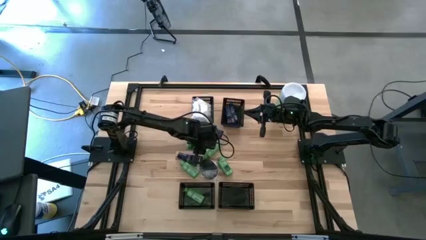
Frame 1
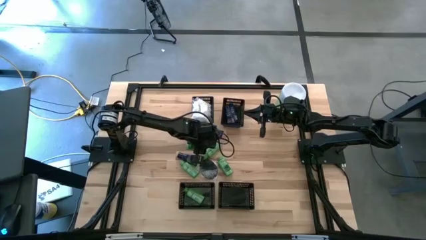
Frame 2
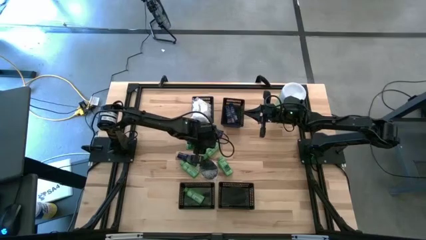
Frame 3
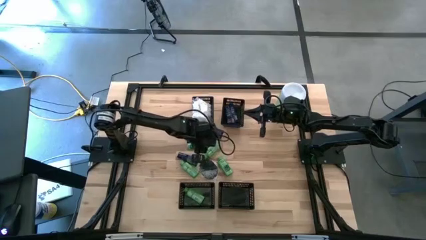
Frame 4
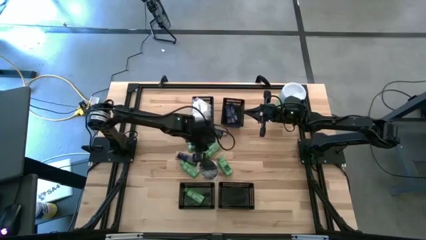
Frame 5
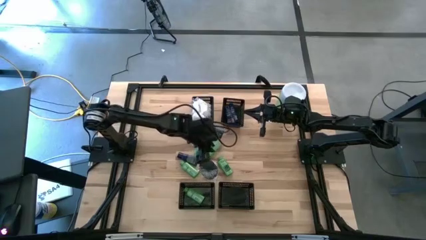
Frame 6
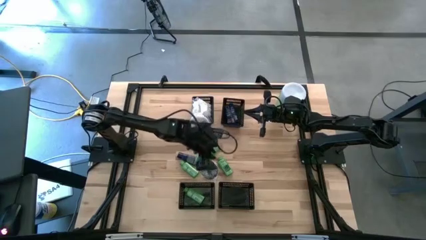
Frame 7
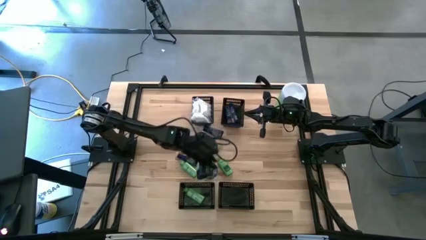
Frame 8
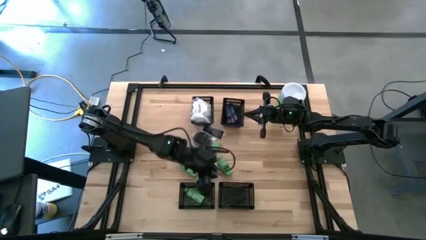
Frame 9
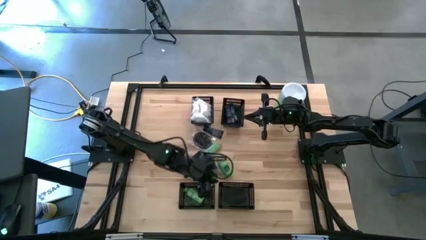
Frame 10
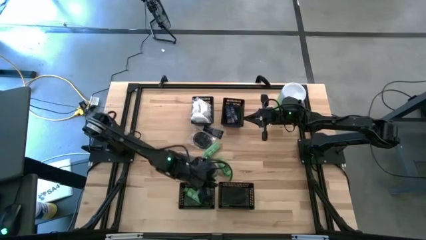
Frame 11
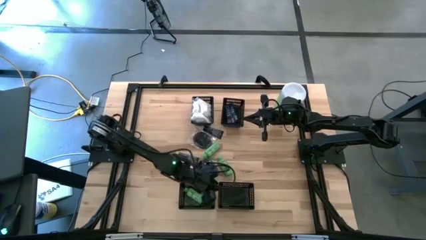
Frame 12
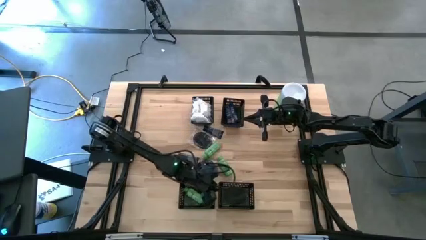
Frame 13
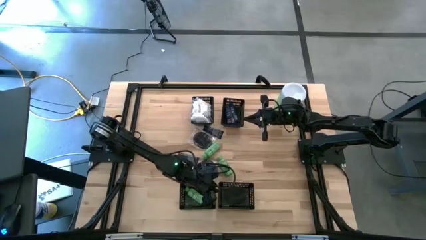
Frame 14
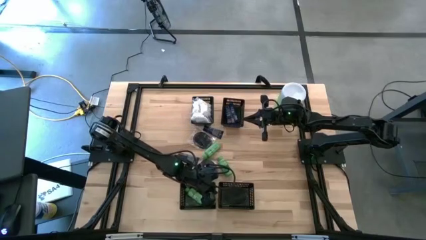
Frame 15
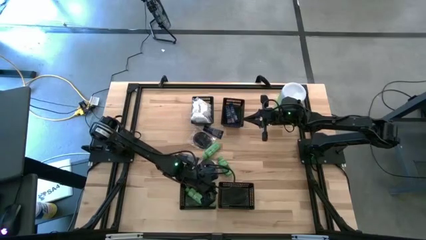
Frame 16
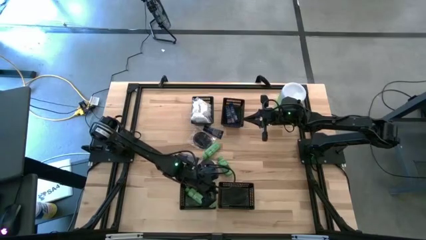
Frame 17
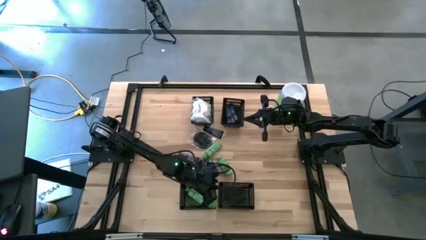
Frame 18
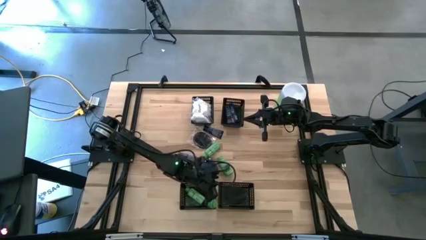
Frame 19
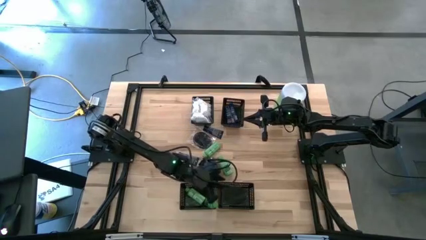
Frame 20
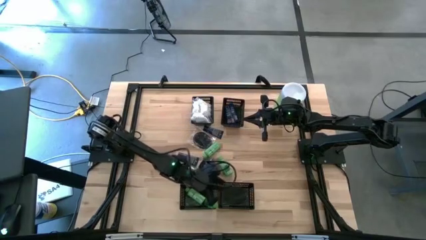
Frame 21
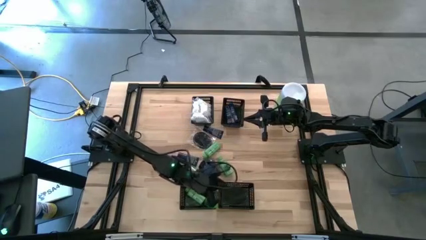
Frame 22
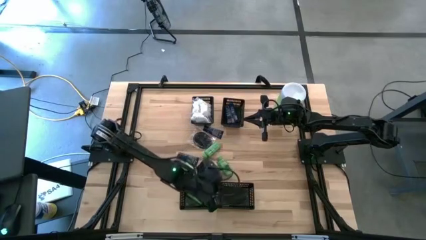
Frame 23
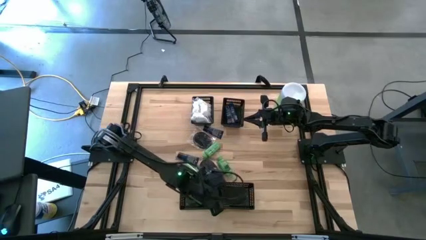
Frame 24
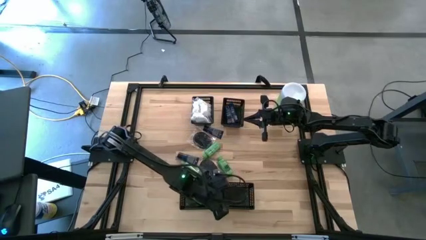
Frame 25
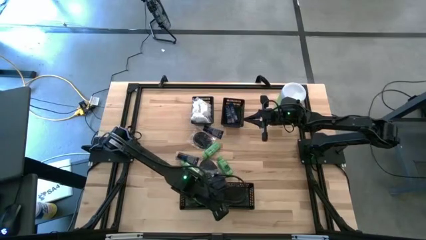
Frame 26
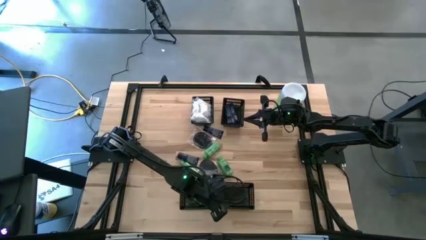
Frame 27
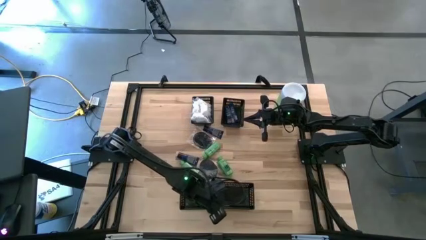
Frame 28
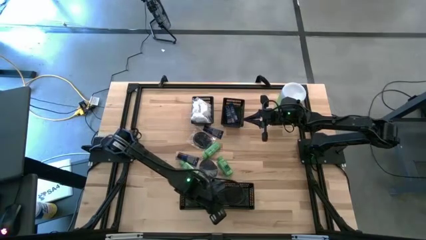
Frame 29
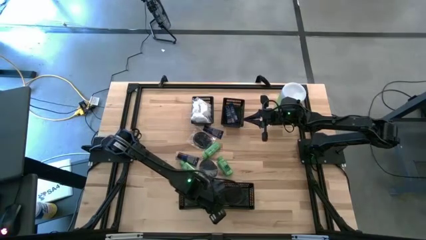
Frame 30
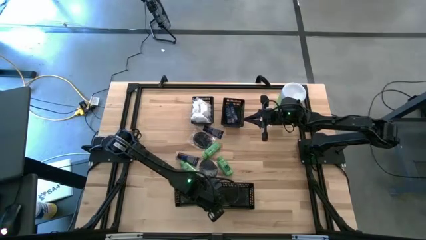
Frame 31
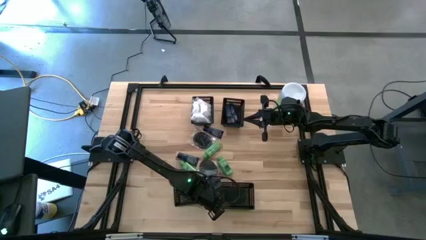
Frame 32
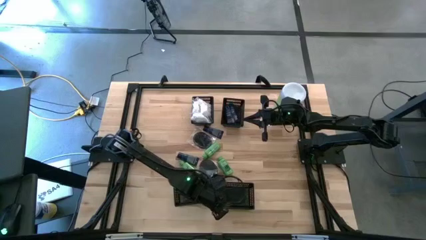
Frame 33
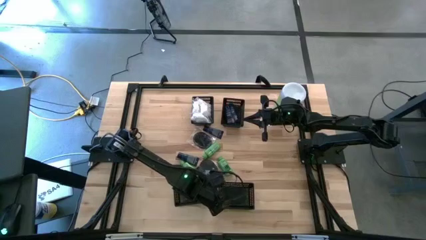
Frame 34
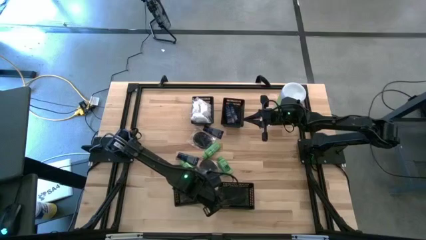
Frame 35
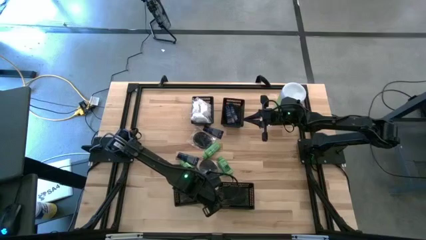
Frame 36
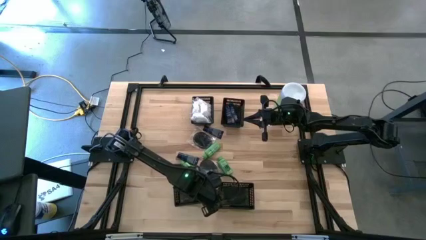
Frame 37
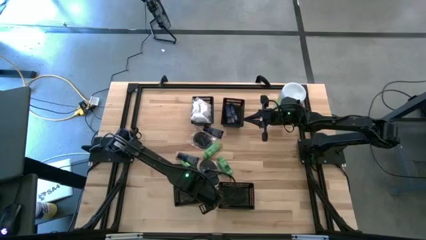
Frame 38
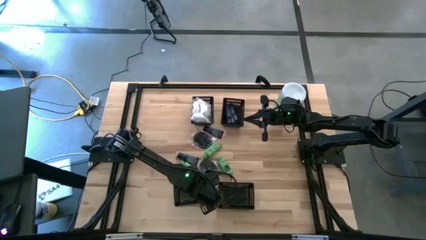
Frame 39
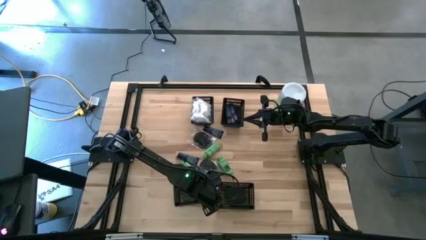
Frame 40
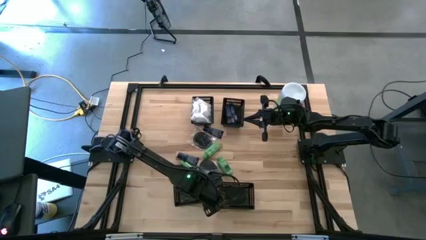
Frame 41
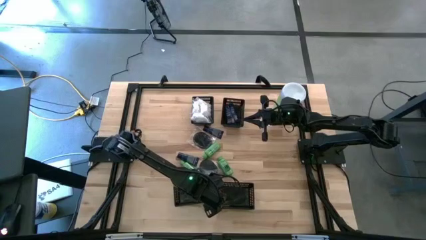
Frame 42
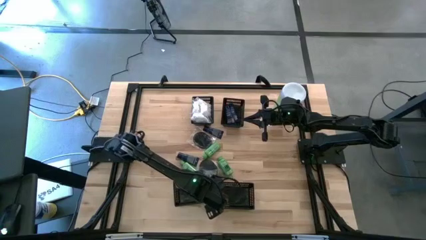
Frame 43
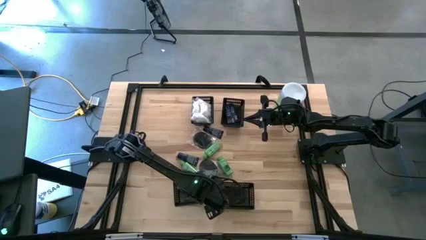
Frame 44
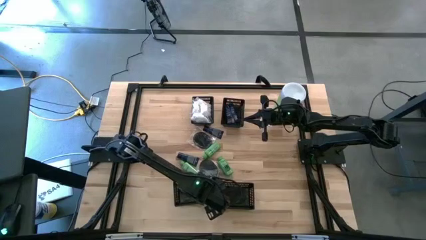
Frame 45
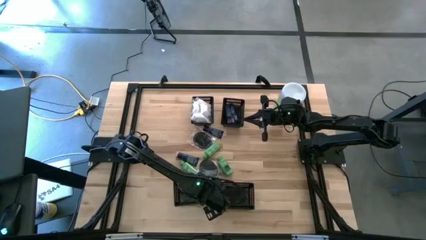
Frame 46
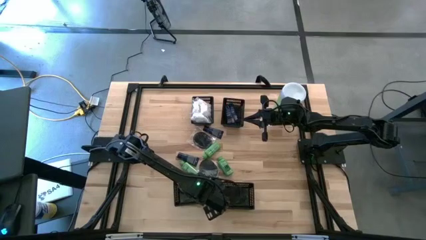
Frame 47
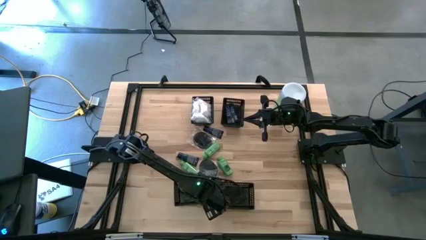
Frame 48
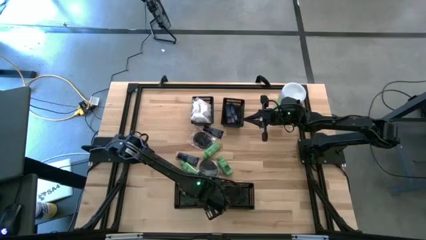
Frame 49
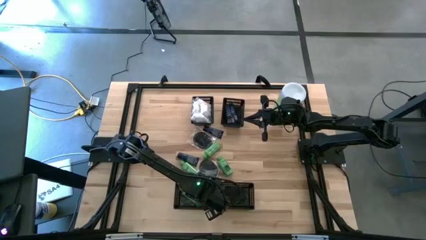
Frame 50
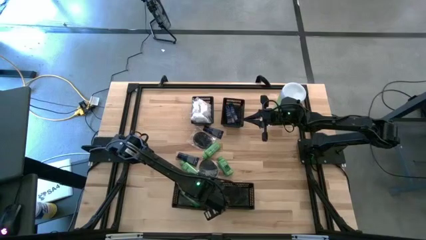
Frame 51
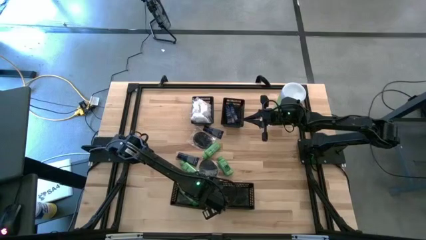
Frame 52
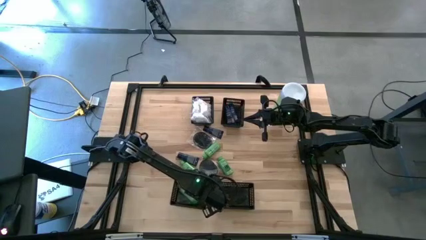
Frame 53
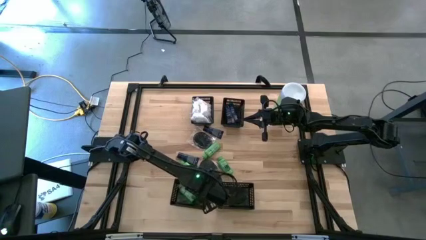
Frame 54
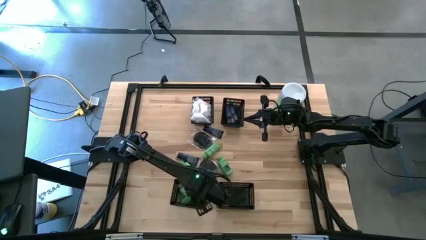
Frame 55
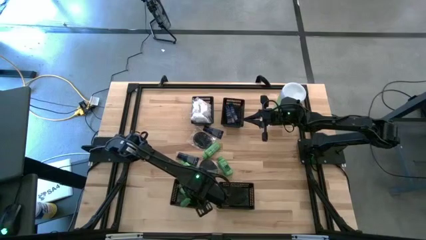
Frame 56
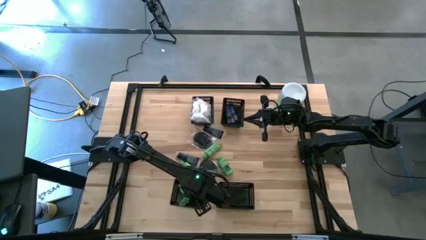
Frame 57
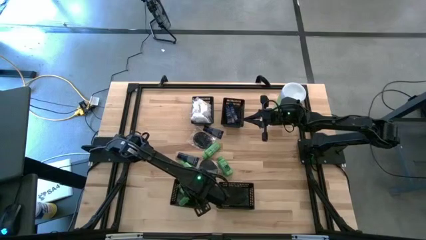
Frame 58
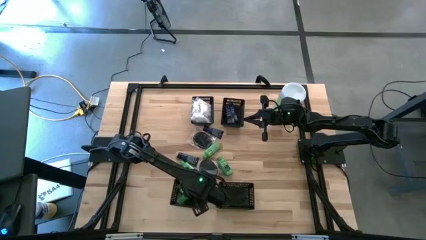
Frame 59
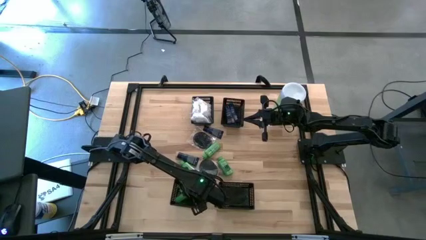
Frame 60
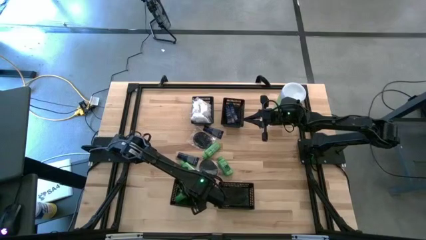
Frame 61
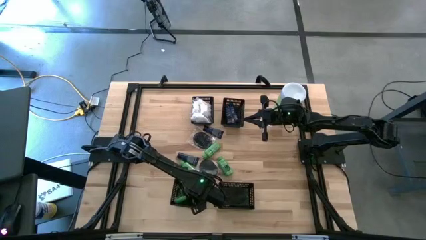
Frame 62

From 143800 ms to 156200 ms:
Task: Pick & Place Travel size toiletries
Put the green shampoo into the bottom left black bin

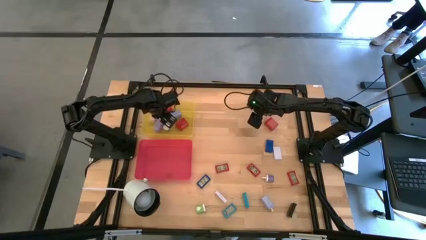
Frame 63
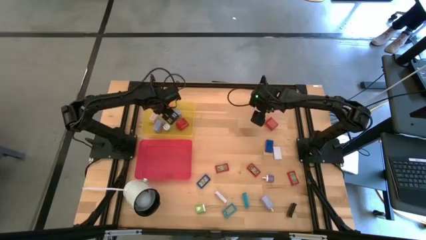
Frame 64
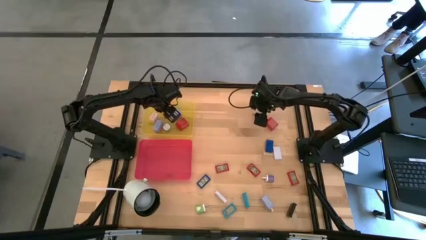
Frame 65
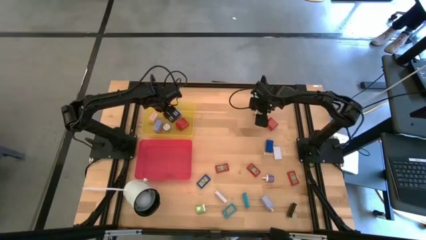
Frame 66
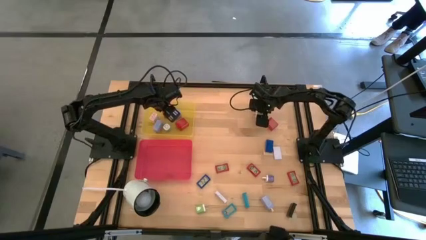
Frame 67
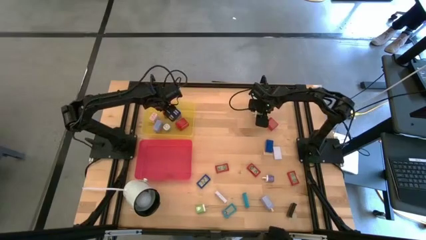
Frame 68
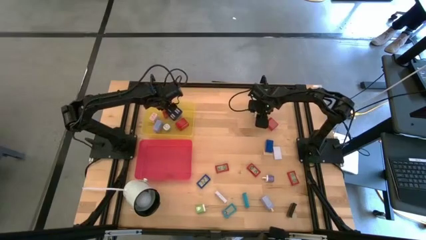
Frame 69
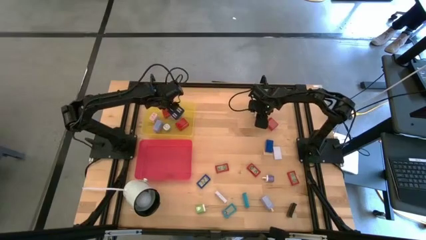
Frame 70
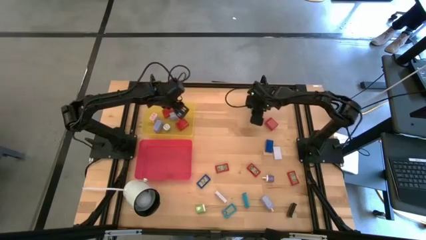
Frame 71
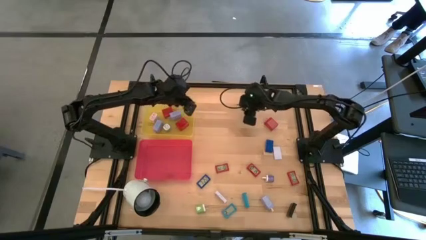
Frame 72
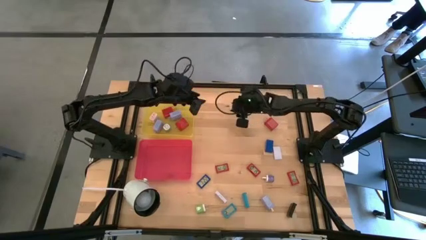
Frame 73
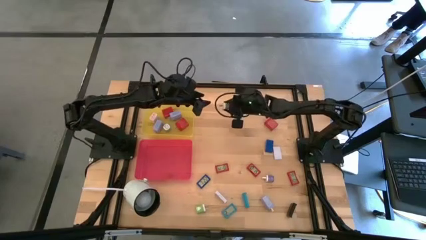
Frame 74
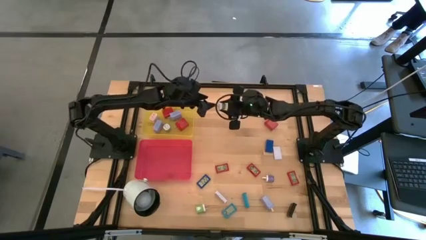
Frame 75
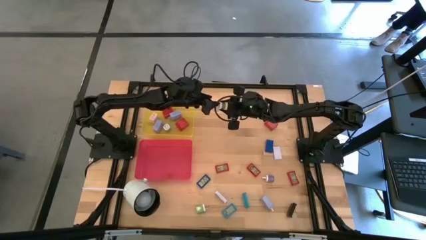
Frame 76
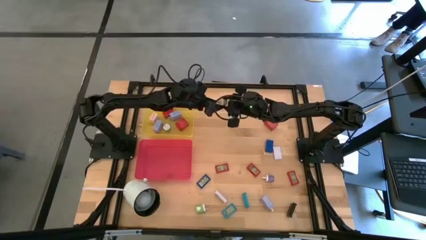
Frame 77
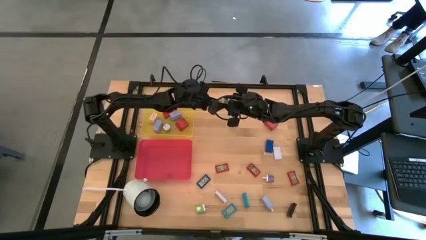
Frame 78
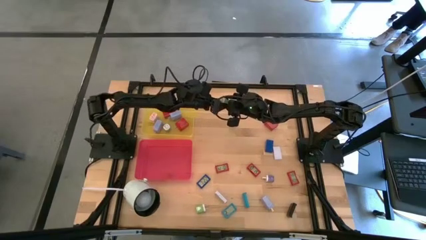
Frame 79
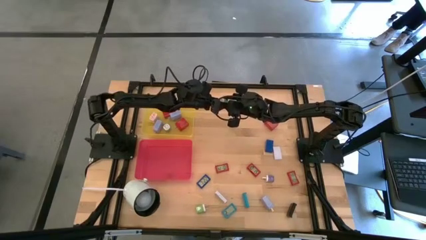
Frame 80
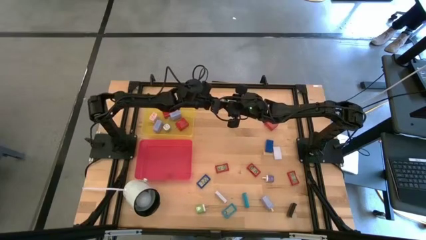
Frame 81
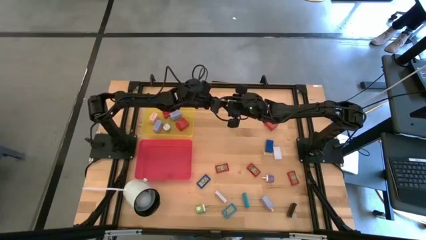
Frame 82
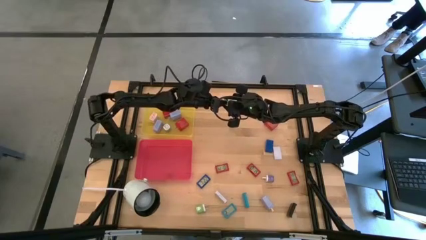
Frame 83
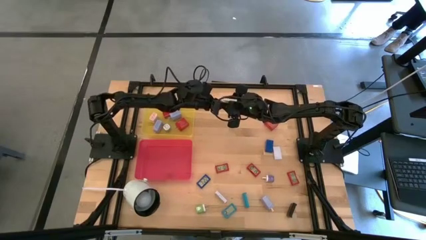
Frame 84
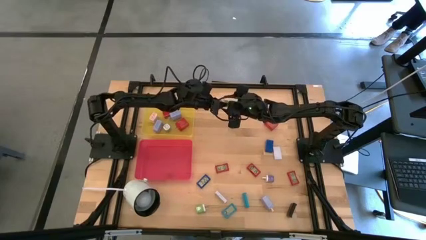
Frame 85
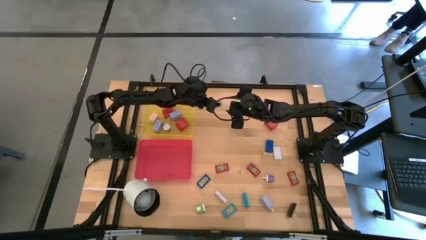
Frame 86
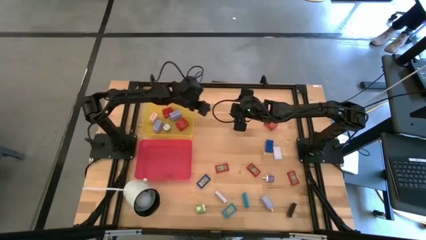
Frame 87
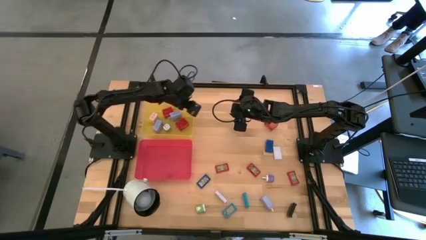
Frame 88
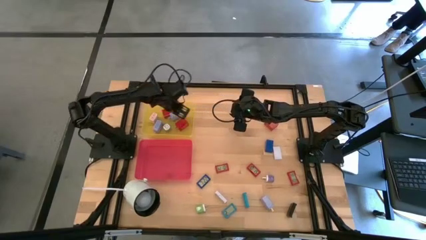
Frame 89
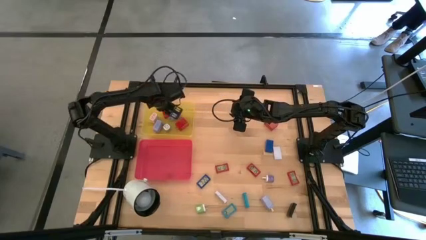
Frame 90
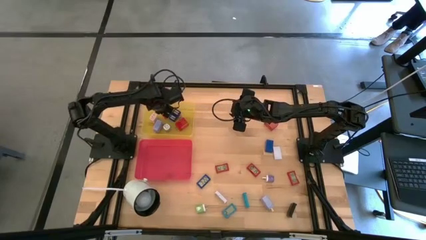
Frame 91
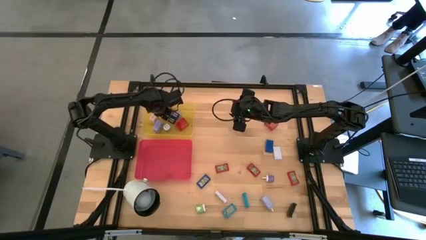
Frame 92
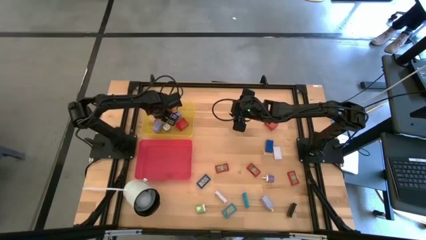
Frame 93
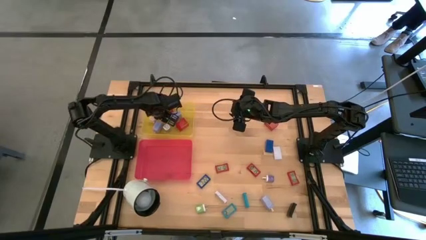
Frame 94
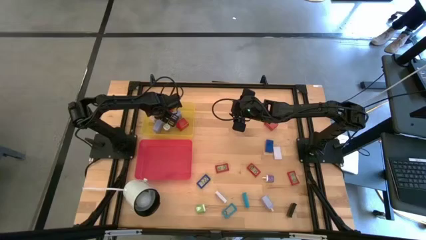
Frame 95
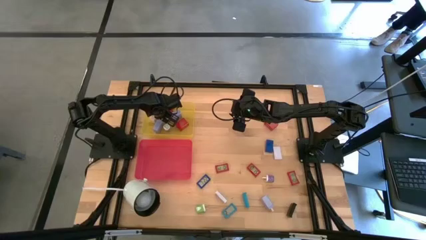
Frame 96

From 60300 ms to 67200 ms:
Task: Pick & Place Office items
Put the green charger adapter into the yellow bin
